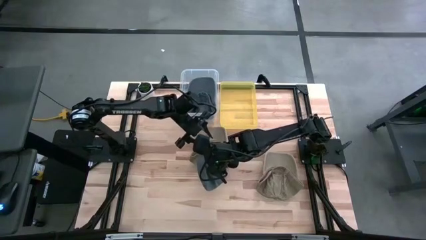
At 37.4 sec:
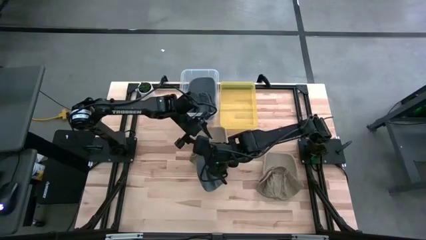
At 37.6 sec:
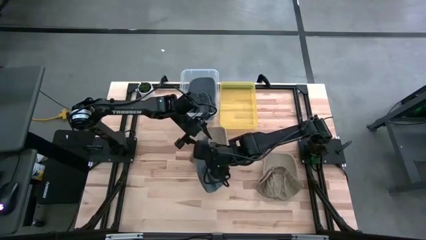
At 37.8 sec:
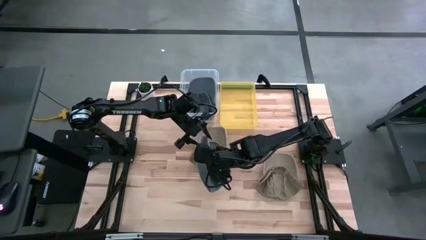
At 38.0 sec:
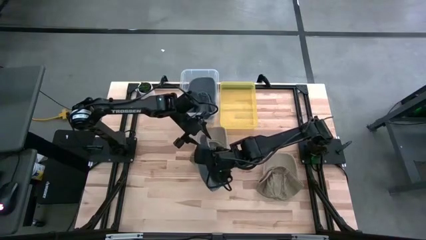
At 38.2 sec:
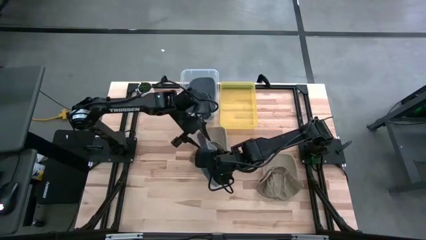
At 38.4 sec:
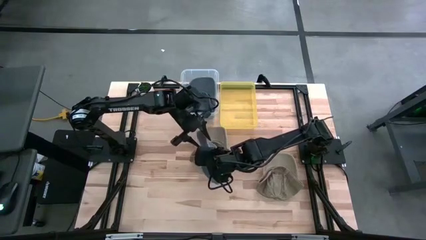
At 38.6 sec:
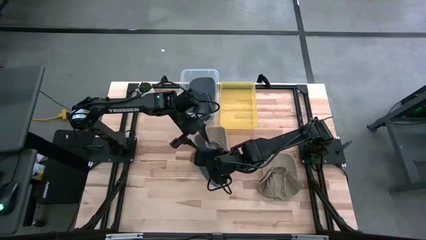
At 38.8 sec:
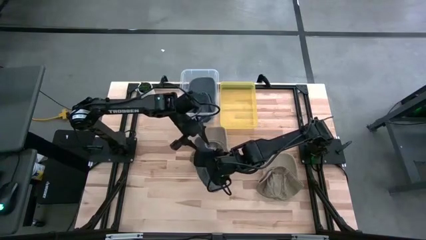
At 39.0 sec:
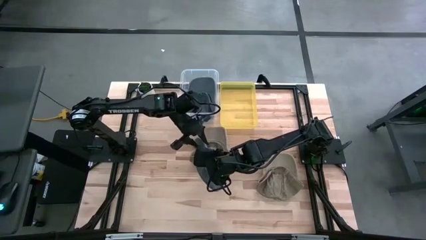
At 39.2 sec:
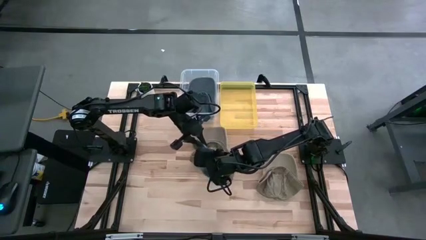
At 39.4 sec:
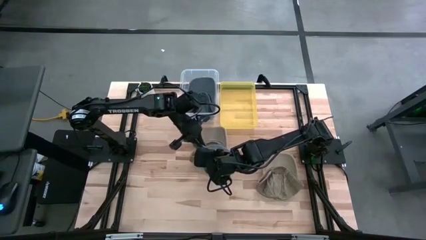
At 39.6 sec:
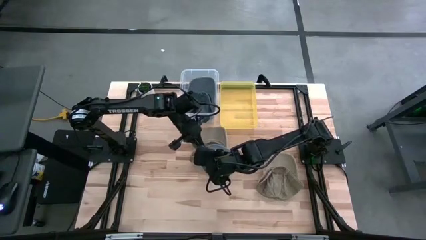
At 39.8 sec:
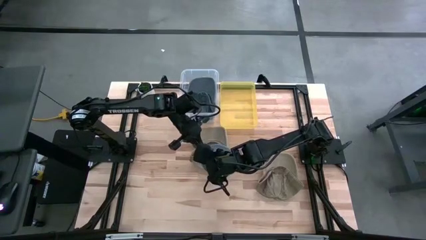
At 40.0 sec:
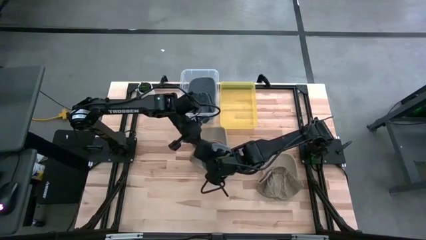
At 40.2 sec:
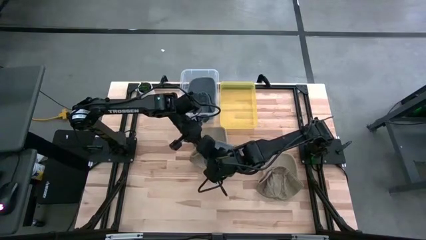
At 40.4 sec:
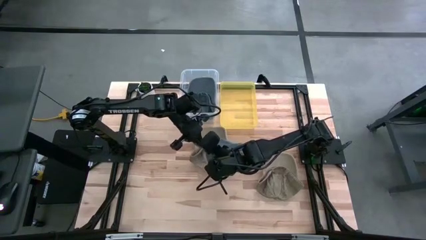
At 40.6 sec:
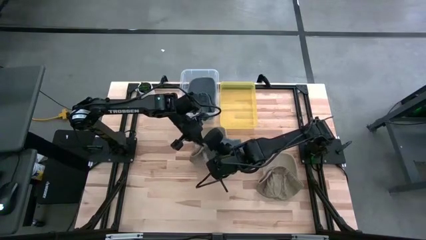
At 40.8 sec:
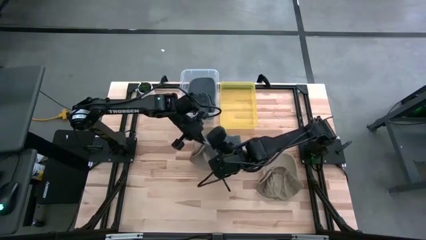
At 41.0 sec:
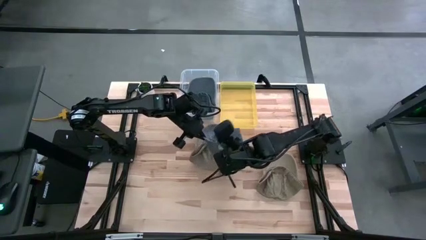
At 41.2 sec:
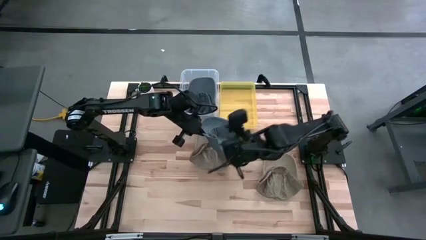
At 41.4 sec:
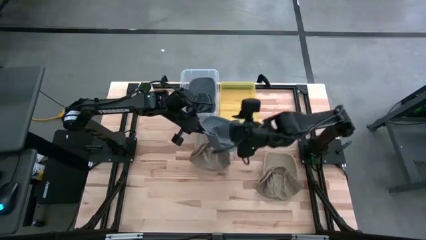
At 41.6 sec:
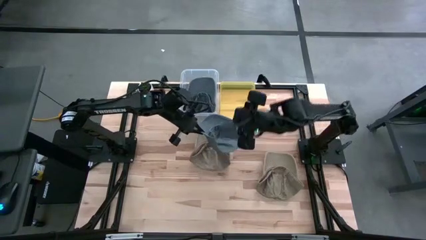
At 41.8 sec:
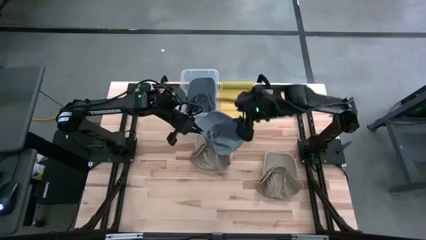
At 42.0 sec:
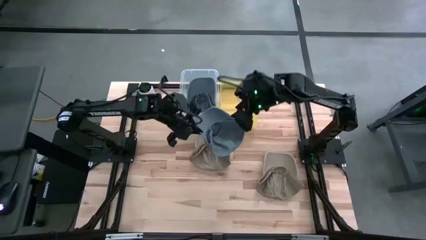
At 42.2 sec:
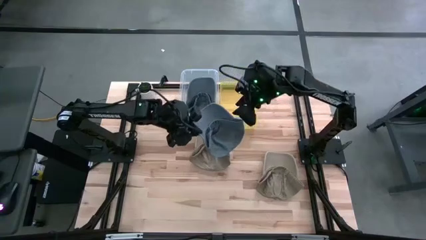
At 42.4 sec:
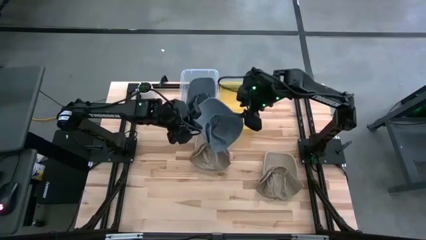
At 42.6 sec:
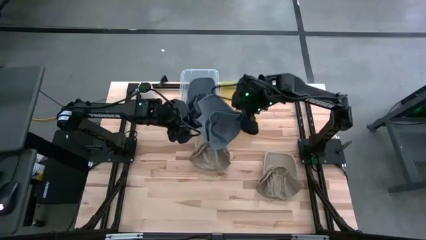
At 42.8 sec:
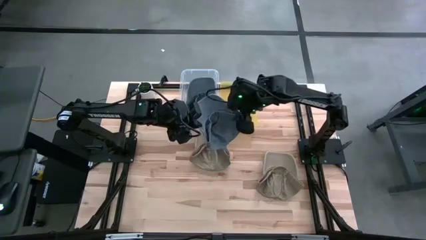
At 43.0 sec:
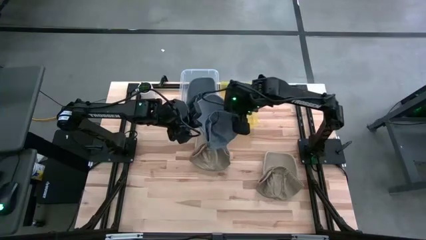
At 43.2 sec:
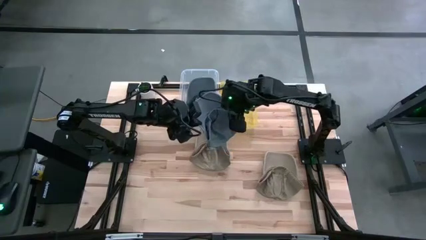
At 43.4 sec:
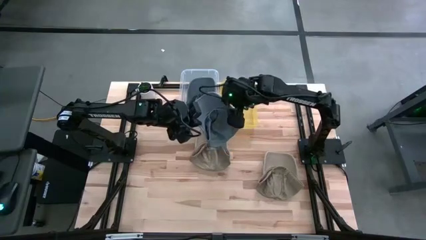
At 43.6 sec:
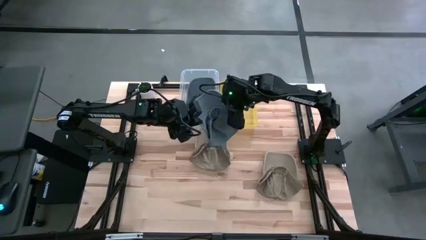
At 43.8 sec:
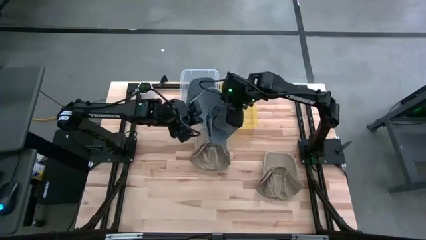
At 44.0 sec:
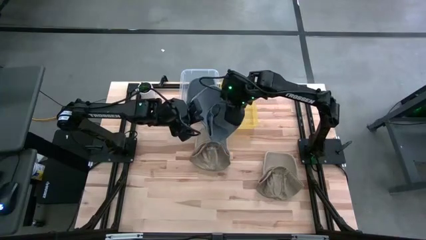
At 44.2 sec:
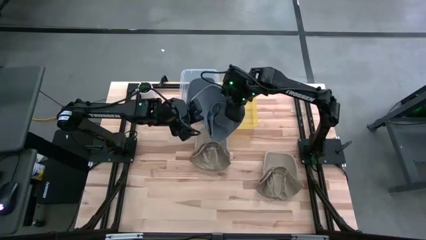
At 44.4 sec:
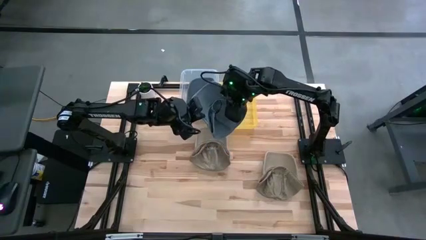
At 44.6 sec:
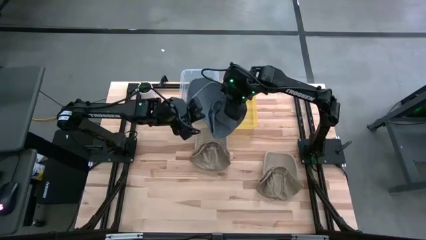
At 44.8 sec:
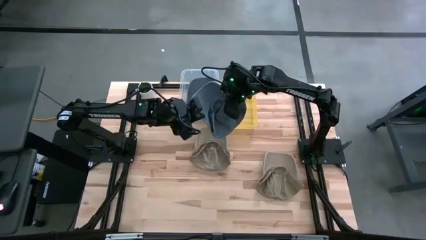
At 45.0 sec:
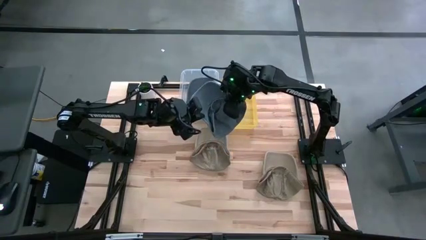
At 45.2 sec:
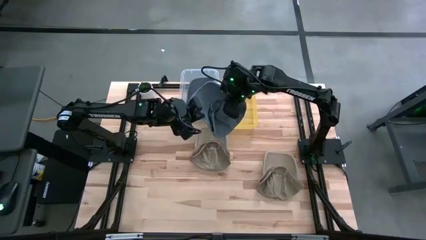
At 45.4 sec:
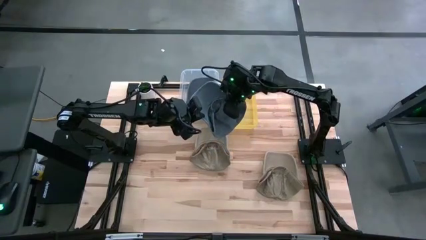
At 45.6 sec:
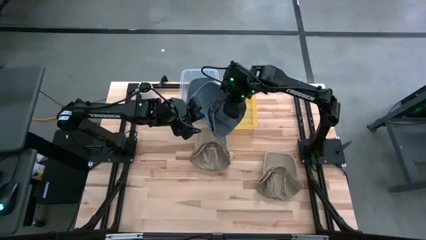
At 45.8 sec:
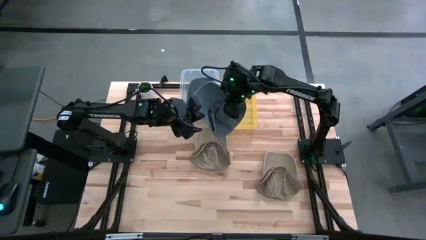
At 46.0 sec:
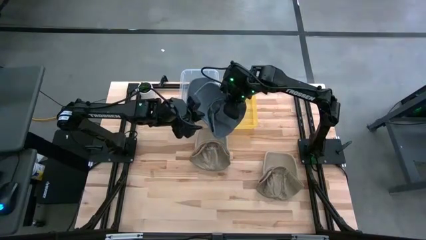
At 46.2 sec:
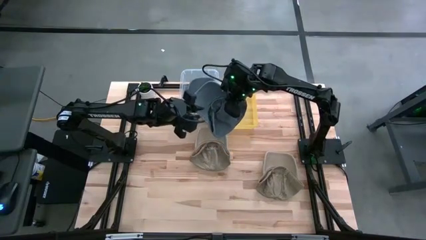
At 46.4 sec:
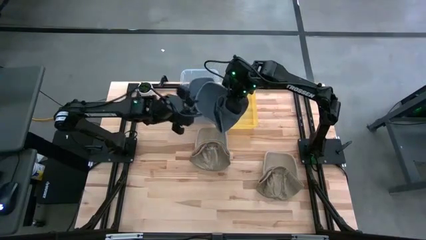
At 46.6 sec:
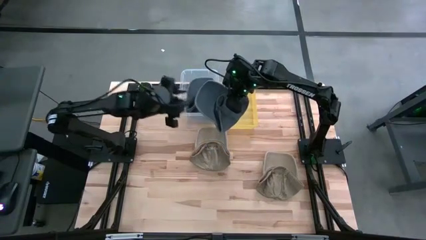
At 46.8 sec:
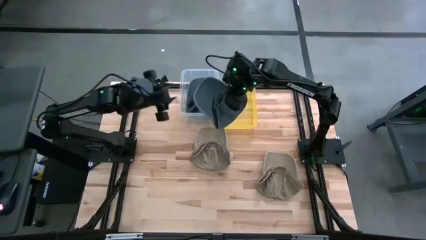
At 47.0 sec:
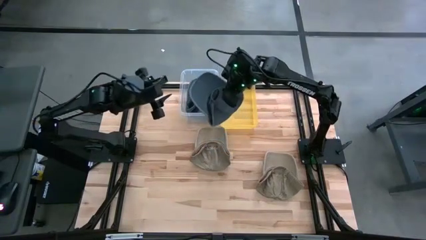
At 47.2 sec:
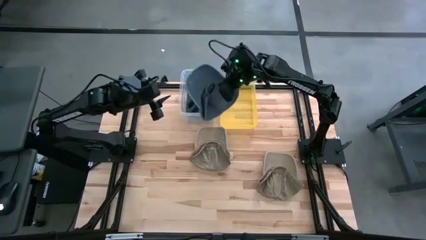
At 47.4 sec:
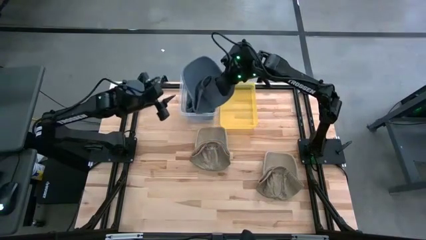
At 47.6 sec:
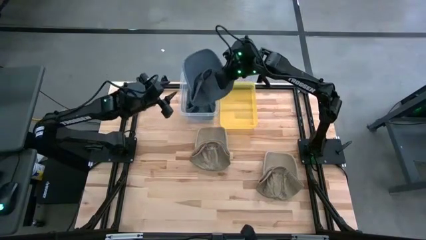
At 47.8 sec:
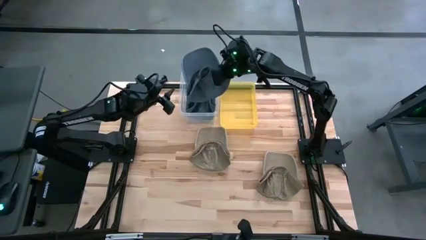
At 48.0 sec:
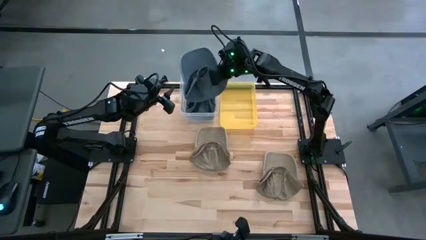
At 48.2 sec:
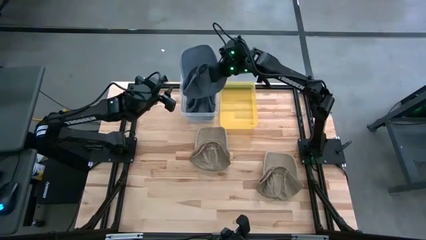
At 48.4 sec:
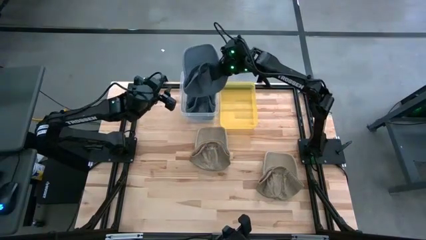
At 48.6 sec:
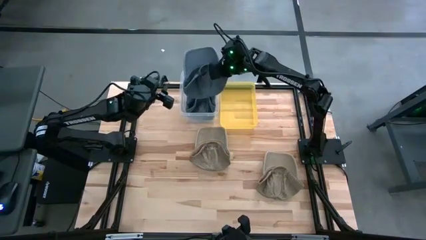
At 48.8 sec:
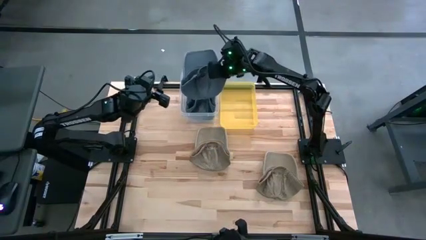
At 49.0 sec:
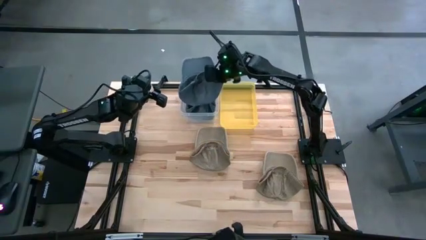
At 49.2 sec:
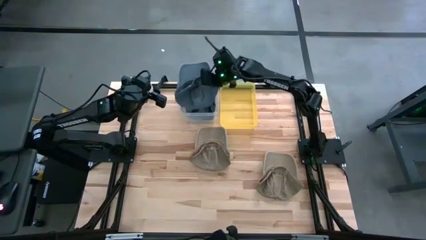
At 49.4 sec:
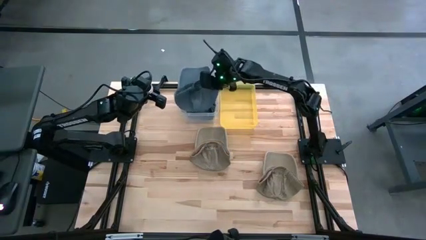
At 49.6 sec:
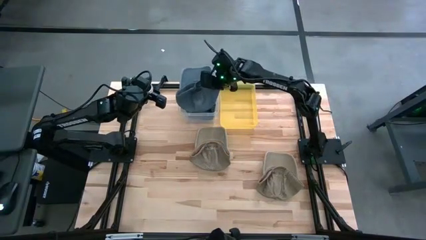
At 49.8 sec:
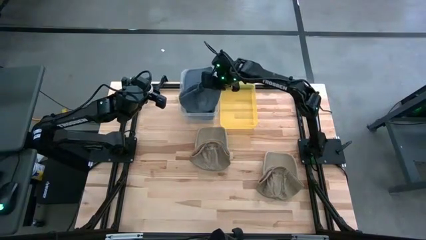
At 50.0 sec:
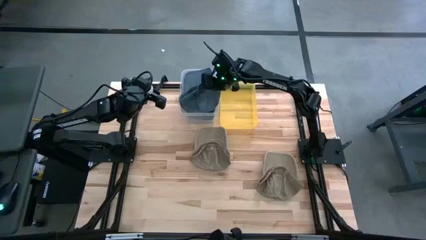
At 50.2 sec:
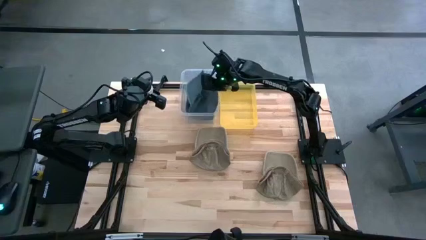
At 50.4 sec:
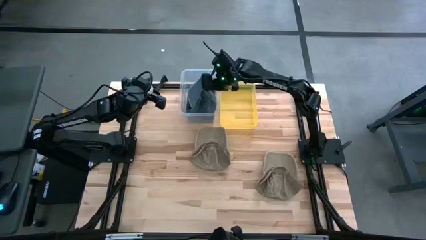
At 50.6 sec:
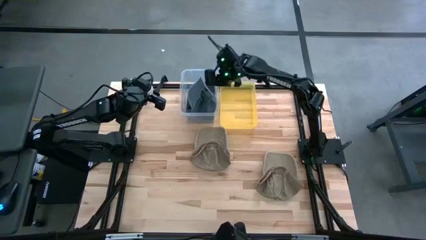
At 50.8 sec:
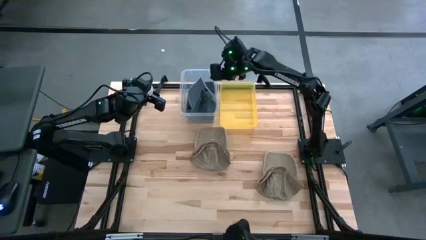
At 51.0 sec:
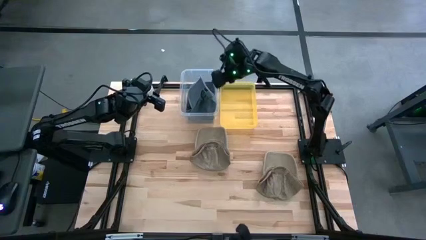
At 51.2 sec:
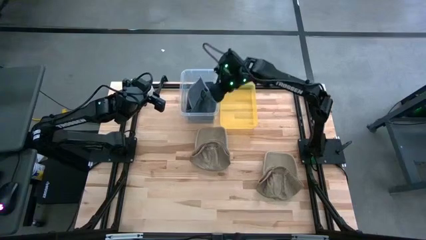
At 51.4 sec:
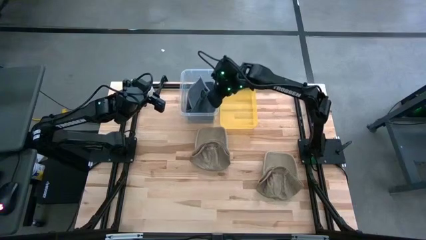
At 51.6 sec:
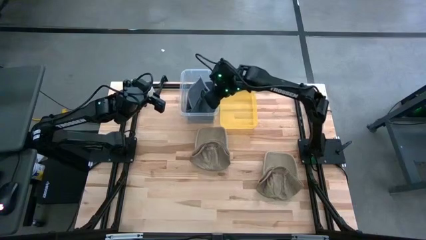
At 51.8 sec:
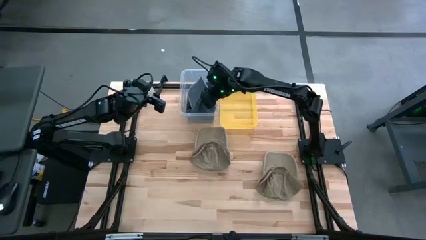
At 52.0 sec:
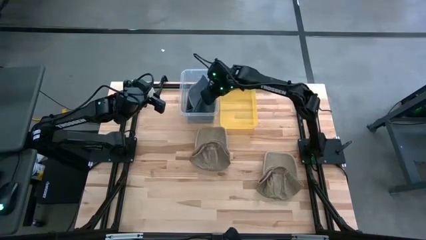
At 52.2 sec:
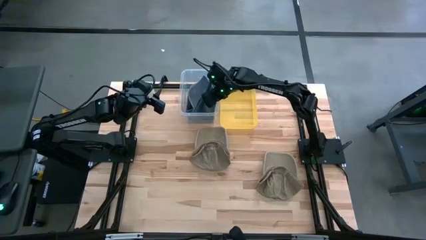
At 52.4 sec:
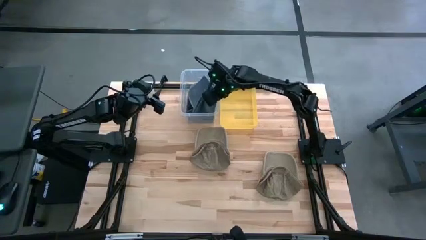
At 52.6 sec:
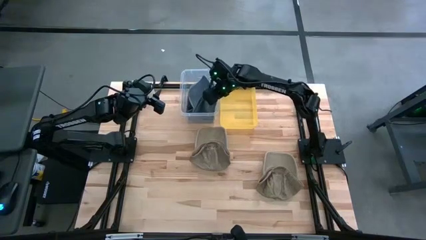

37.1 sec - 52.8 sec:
Task: Pick & Place hat
Put the black cap into the transparent bin
